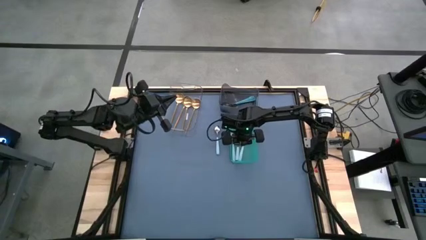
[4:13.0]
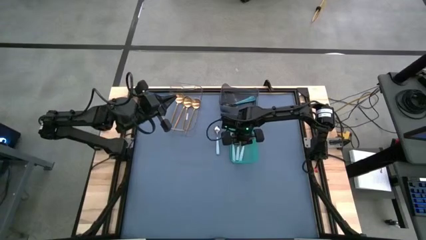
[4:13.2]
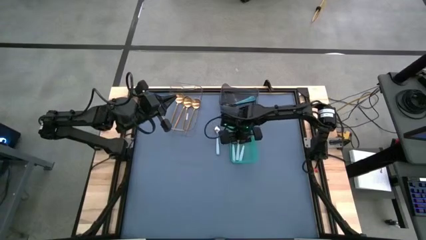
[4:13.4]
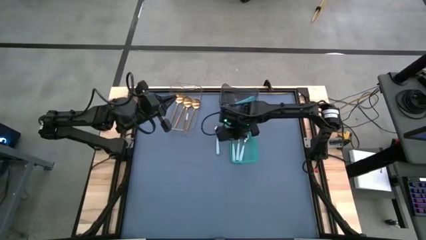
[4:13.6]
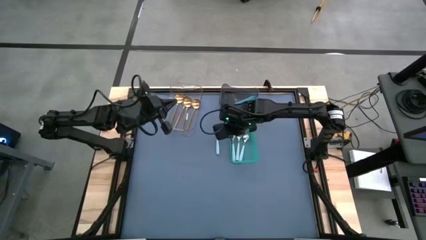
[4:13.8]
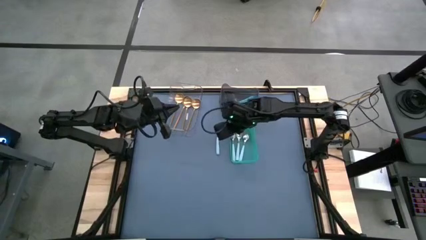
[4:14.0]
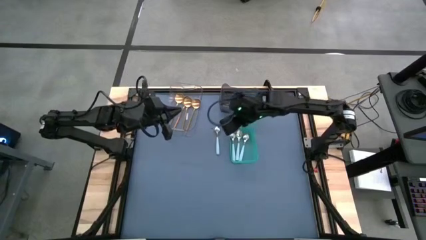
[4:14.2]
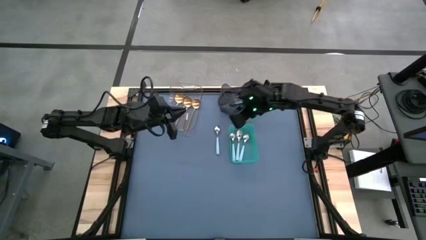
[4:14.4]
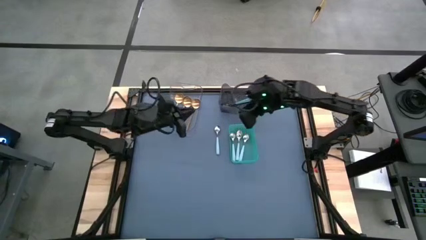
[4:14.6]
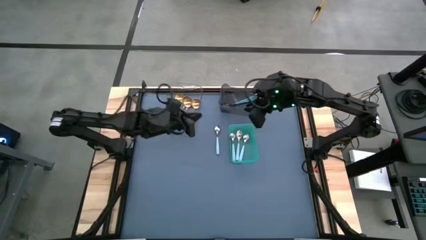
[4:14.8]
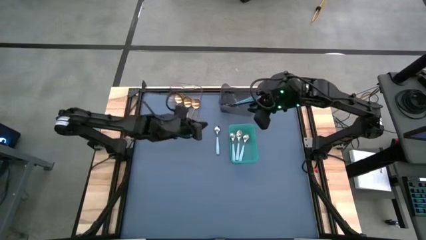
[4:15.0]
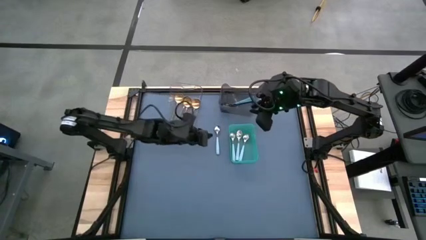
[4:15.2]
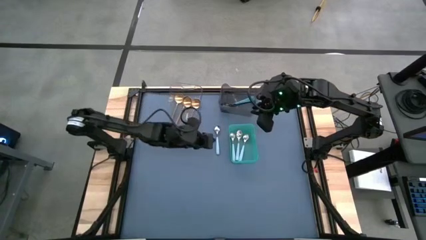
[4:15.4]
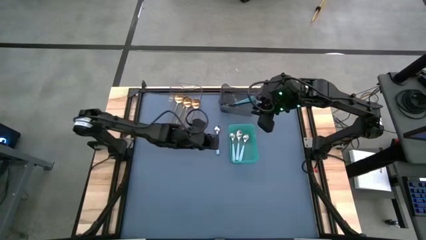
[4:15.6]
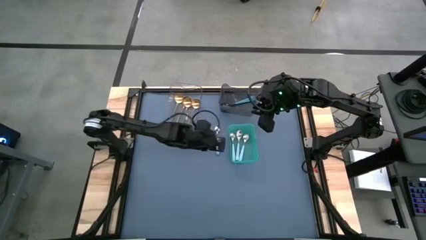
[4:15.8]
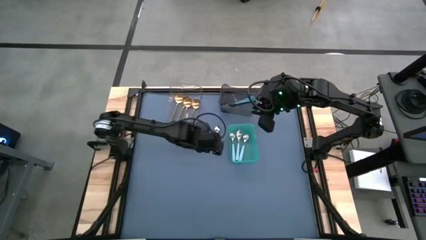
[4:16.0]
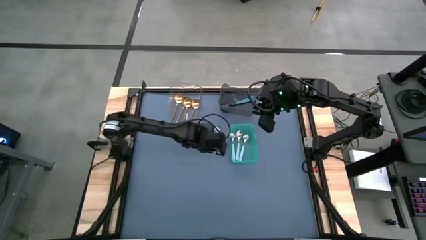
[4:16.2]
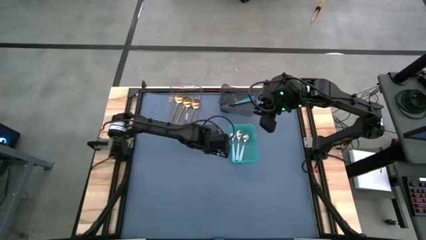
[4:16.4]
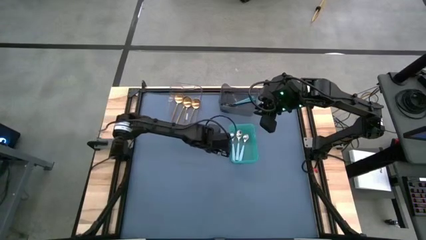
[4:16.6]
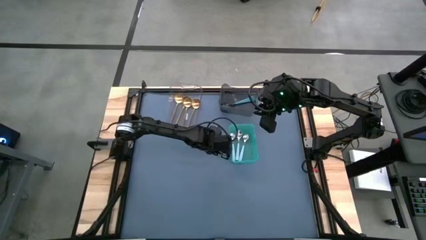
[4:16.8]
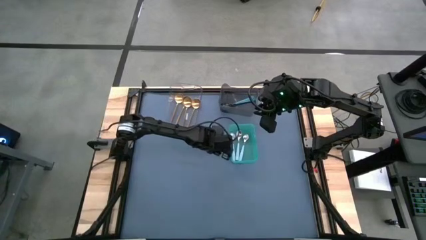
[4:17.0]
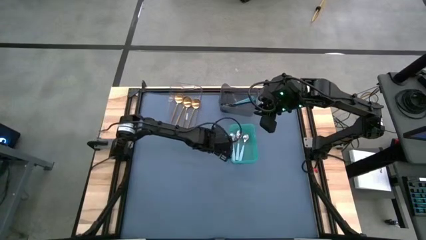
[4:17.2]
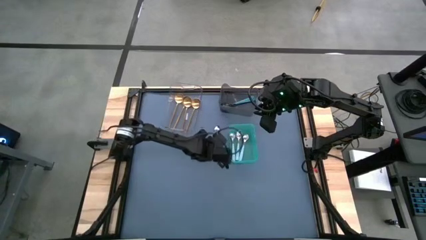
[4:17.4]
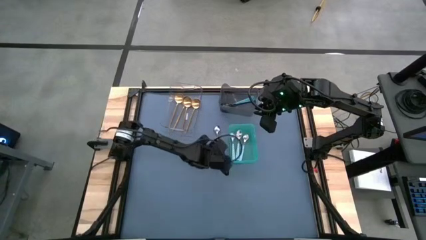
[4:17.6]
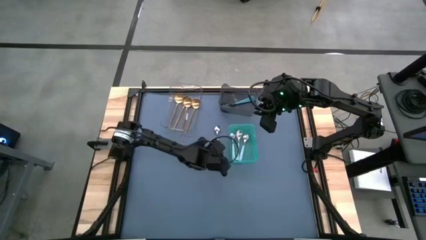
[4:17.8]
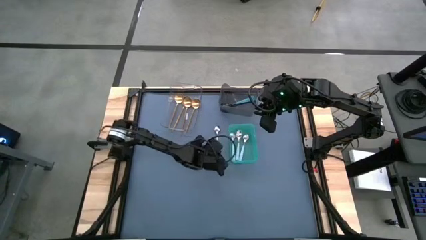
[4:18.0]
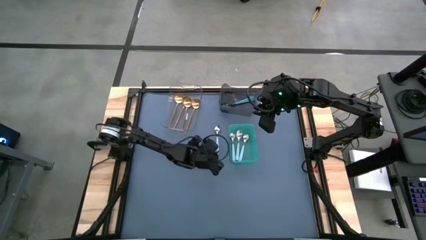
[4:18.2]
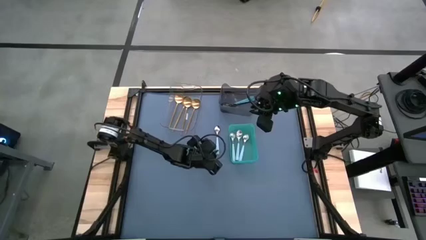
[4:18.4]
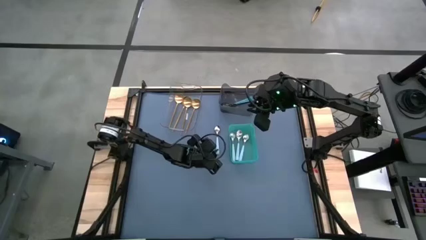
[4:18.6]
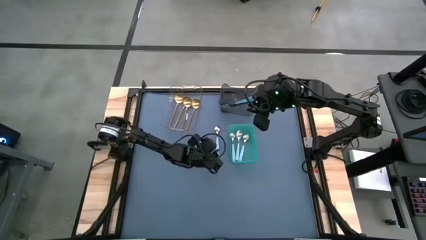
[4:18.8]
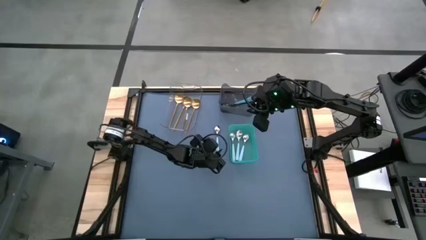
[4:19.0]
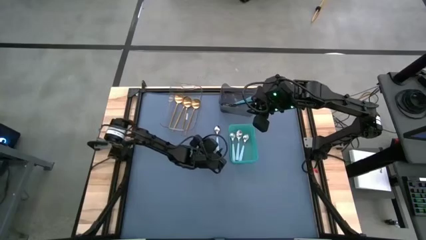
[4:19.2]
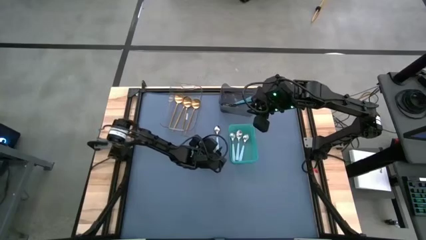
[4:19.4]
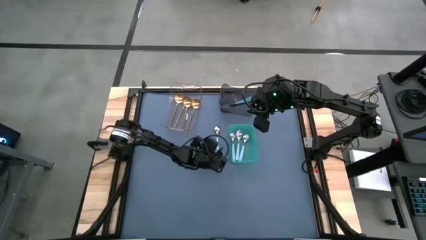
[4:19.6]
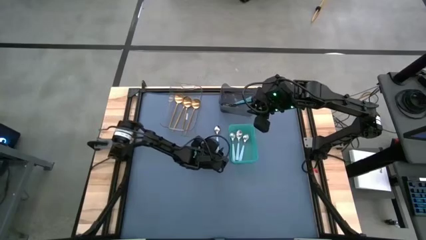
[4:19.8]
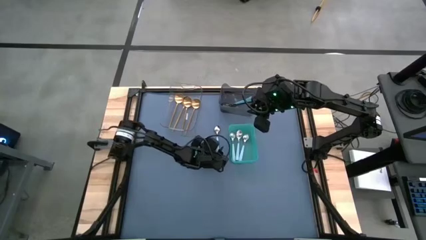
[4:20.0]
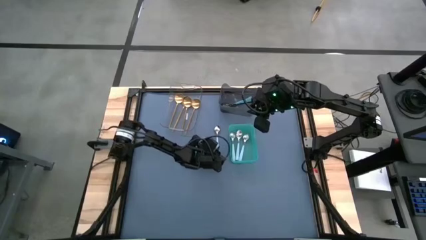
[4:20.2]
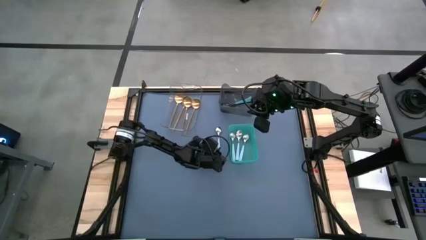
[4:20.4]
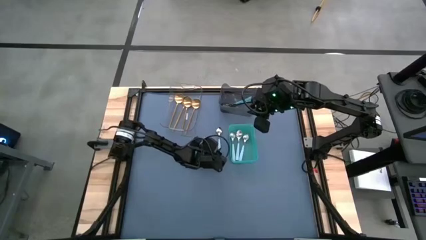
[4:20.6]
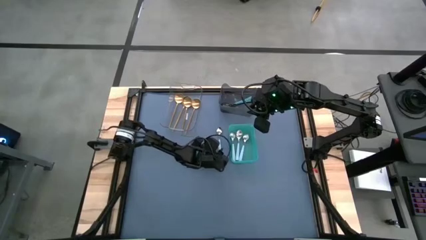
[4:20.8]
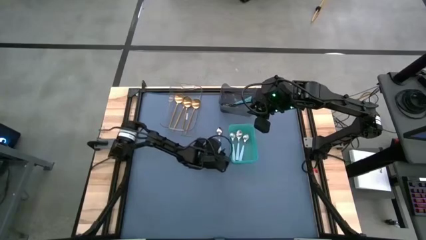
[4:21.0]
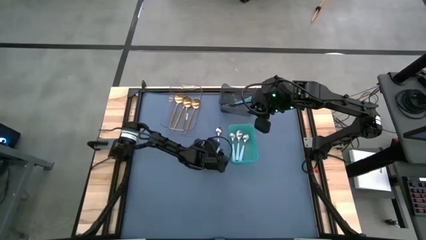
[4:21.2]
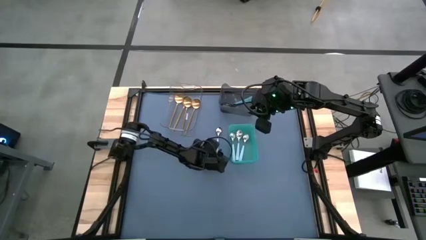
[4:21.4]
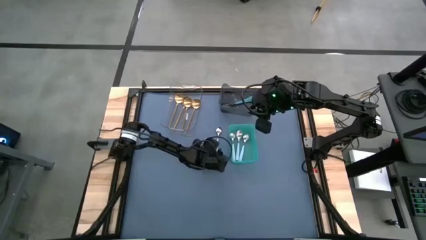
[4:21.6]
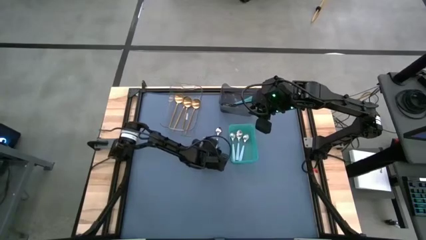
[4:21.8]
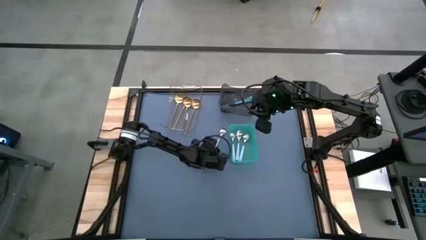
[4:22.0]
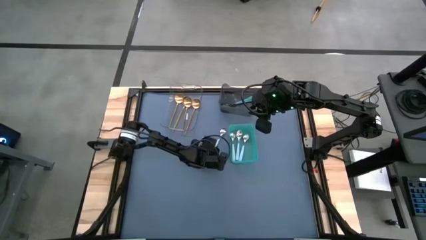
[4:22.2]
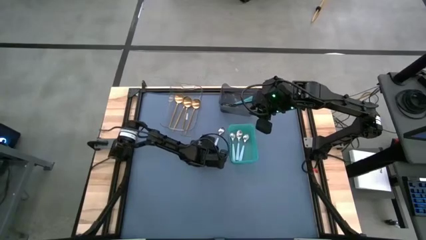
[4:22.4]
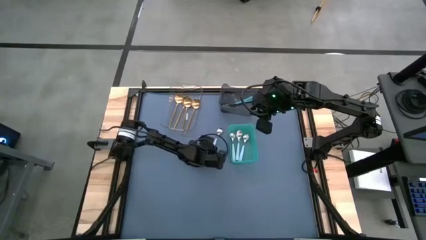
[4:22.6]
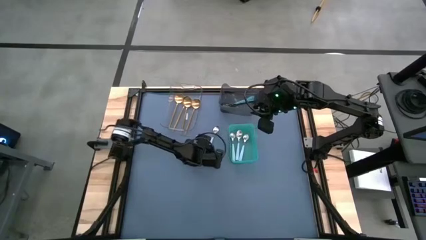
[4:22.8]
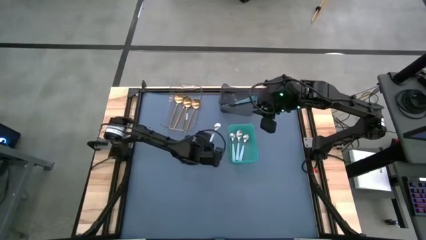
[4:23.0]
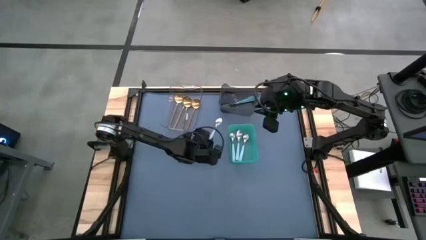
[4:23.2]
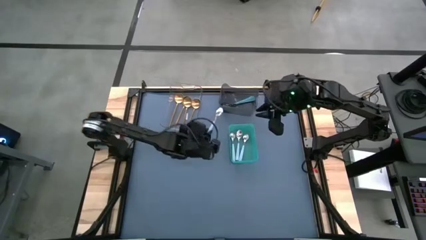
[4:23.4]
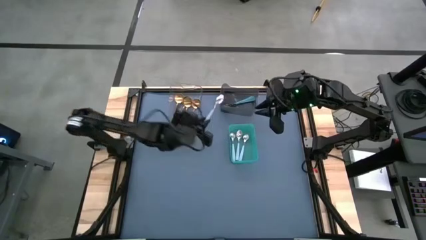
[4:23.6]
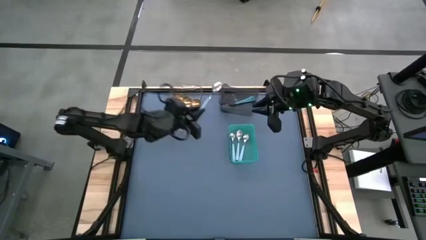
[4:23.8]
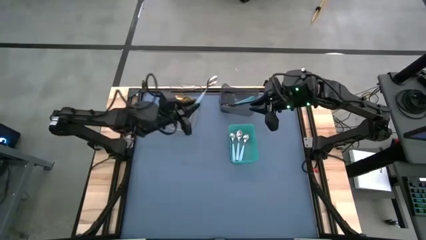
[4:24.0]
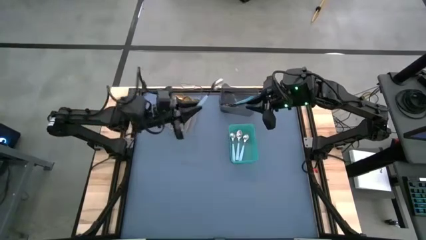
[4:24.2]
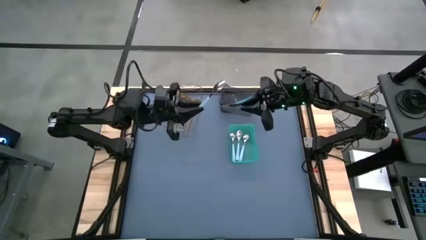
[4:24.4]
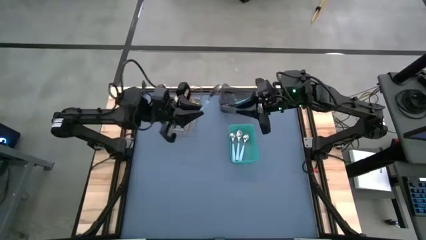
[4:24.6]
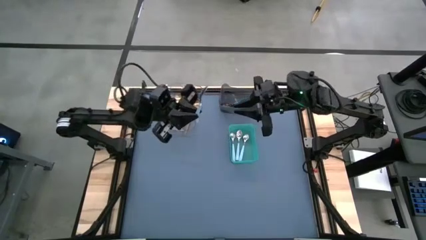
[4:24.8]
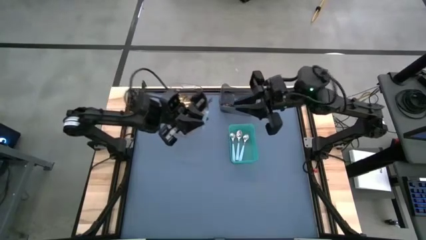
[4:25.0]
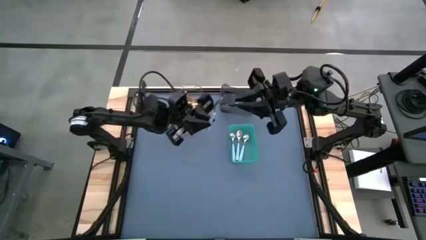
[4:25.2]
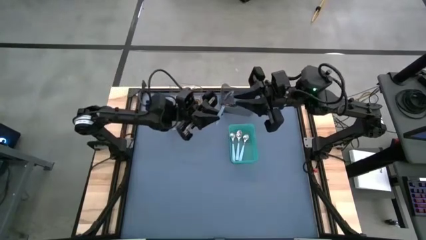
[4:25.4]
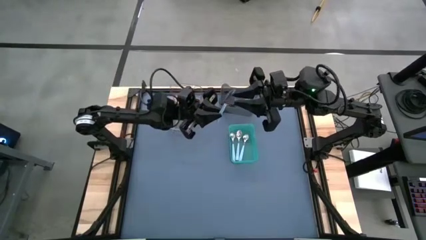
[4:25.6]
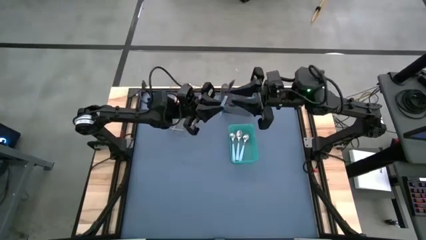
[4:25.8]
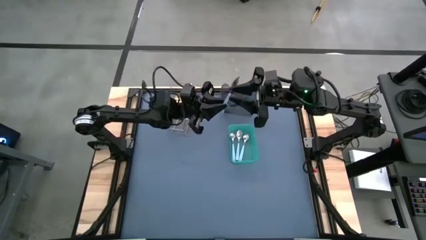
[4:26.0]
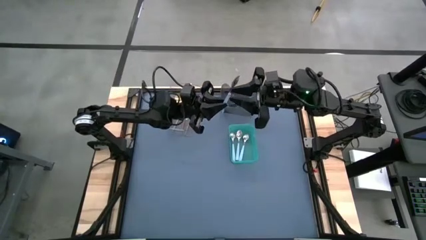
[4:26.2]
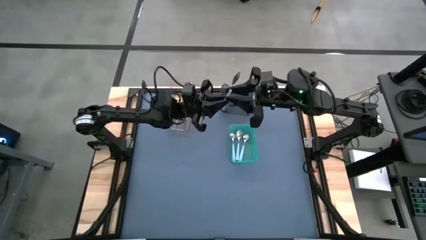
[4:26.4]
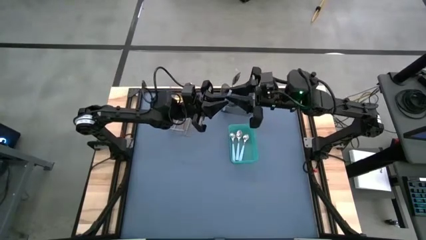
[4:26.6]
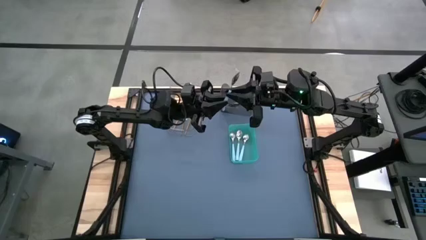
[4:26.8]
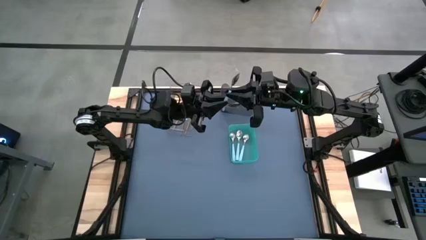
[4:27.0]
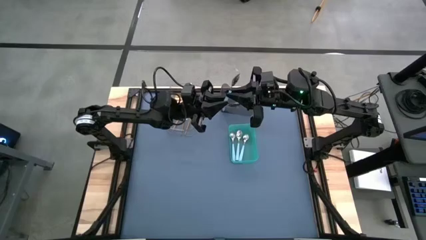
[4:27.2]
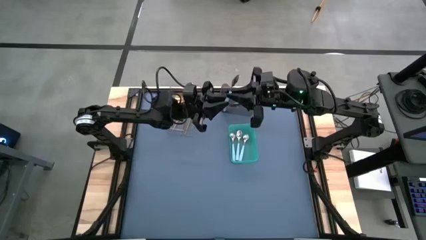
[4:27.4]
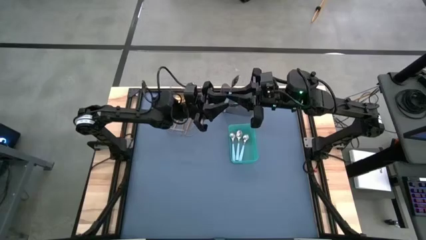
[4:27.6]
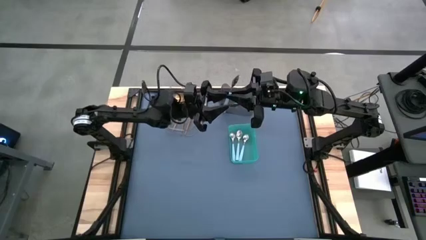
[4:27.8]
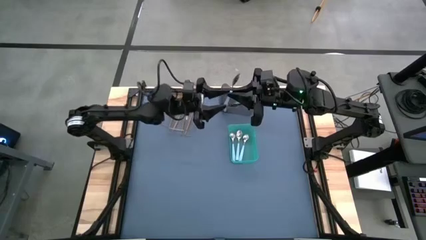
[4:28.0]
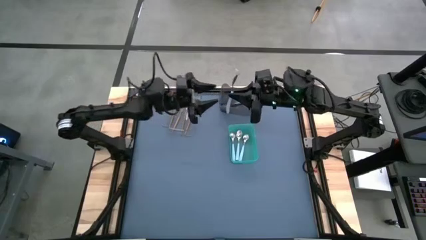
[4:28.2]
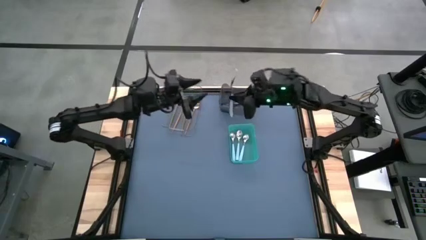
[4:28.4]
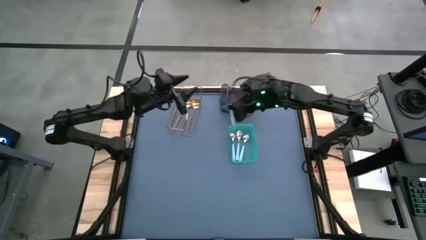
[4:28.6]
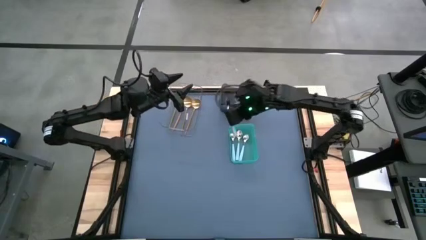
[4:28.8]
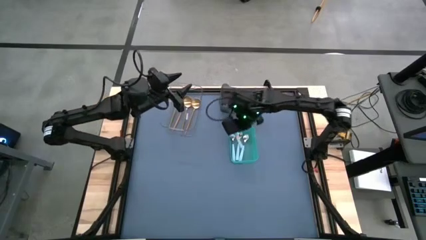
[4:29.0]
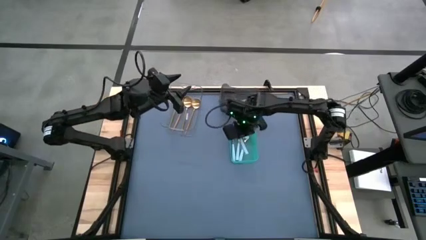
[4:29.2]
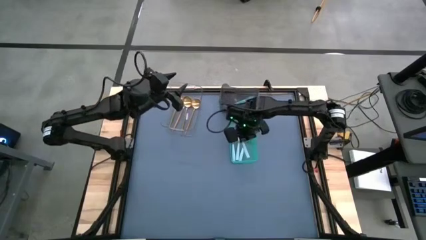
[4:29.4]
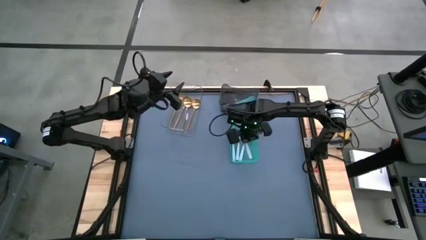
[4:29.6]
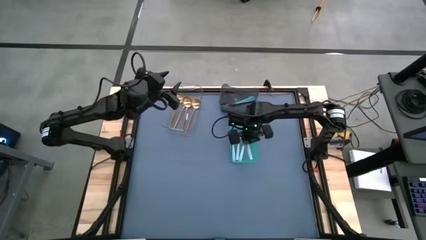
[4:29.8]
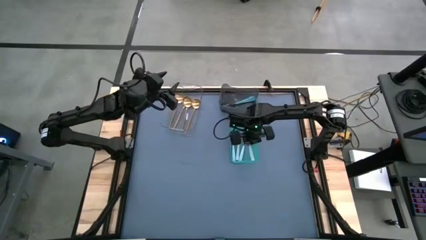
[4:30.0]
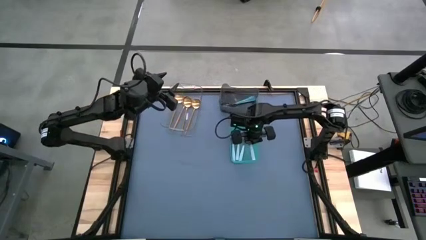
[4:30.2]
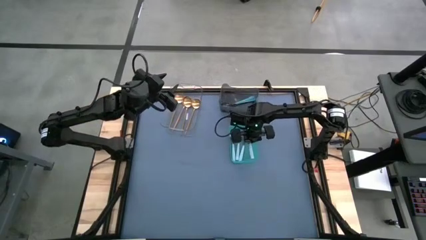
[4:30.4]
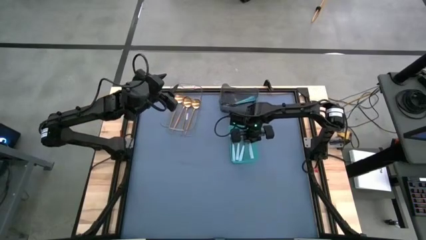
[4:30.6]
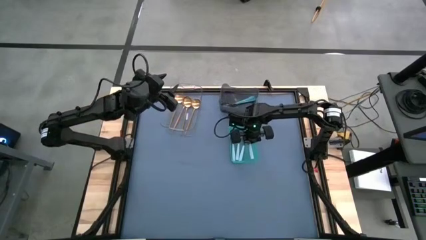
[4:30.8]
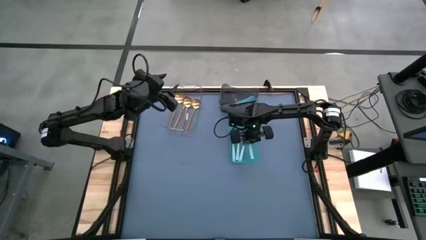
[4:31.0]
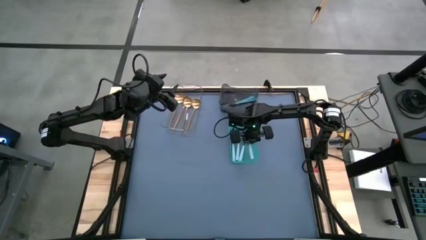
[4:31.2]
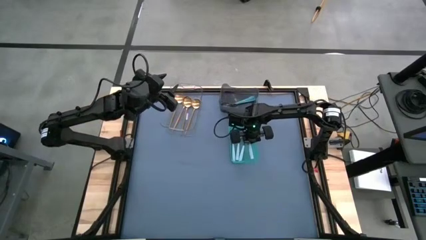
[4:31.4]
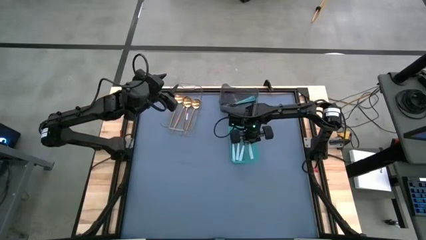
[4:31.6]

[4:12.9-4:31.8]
Task: Sort silverware by color (type)
Put the light blue spoon into the green bin
